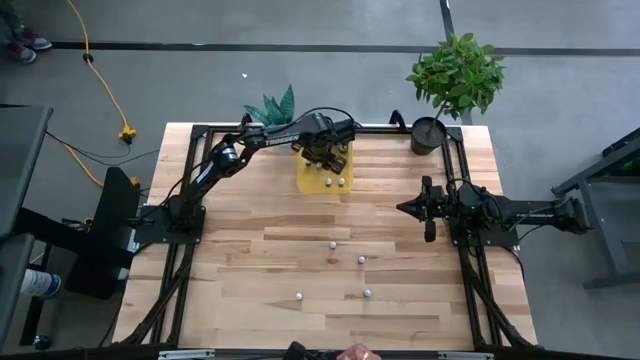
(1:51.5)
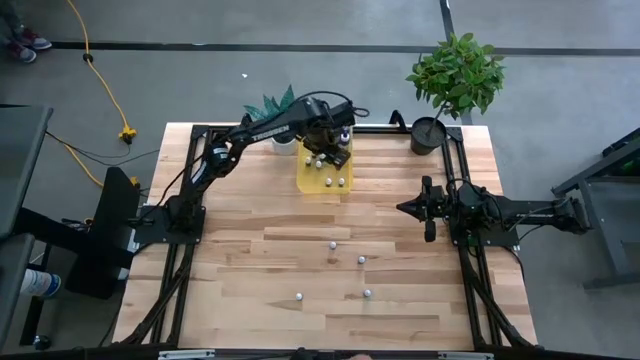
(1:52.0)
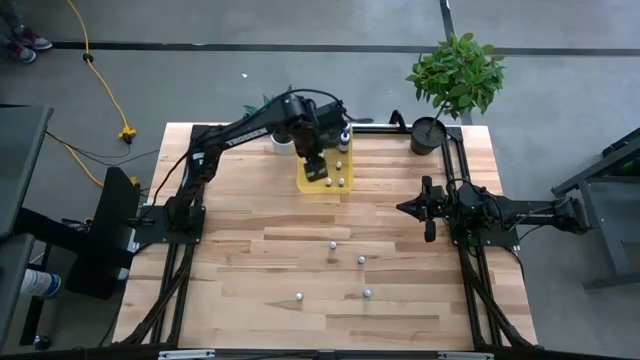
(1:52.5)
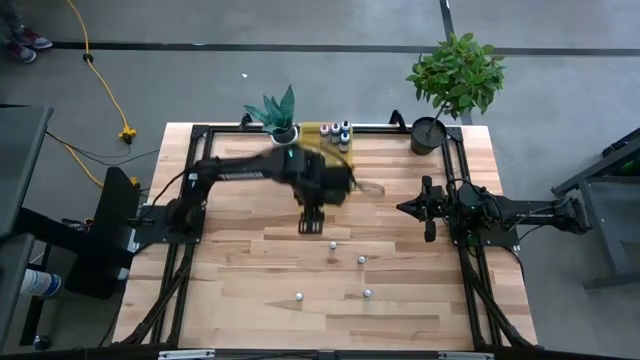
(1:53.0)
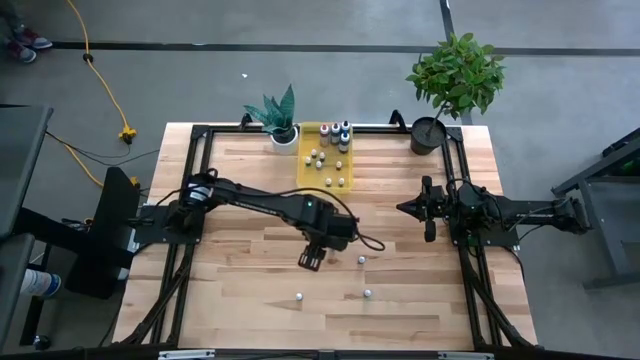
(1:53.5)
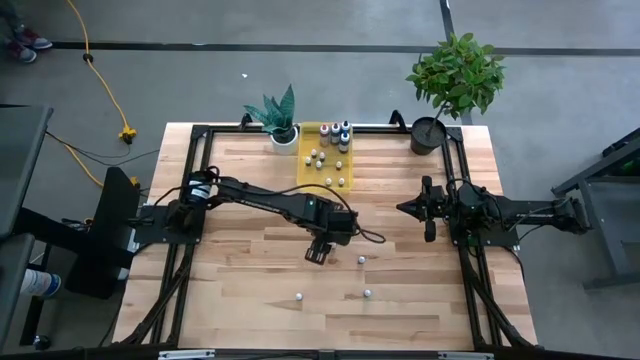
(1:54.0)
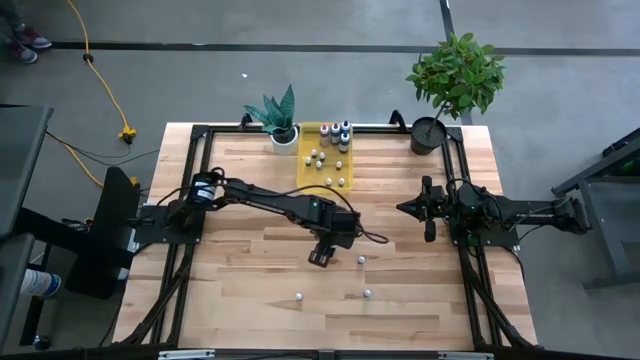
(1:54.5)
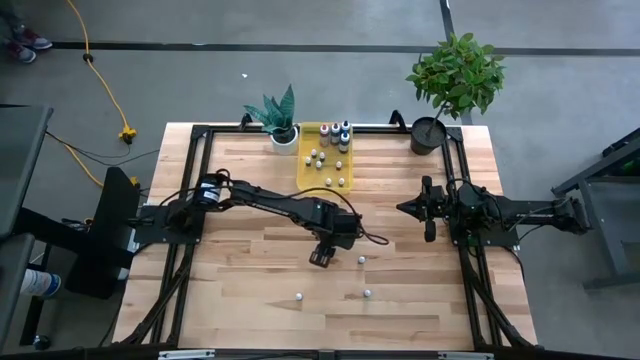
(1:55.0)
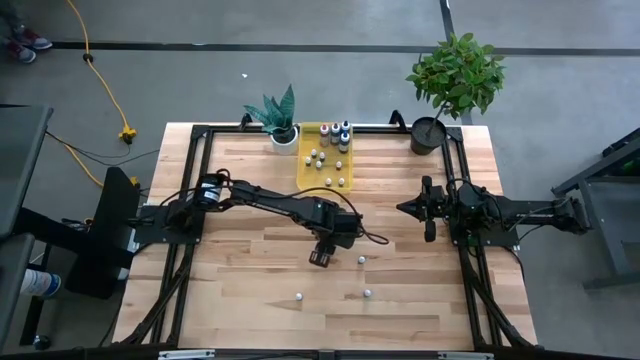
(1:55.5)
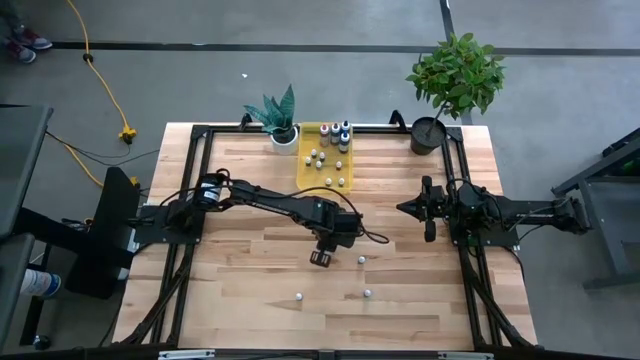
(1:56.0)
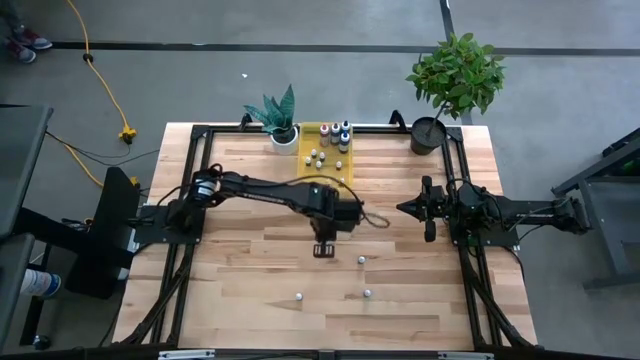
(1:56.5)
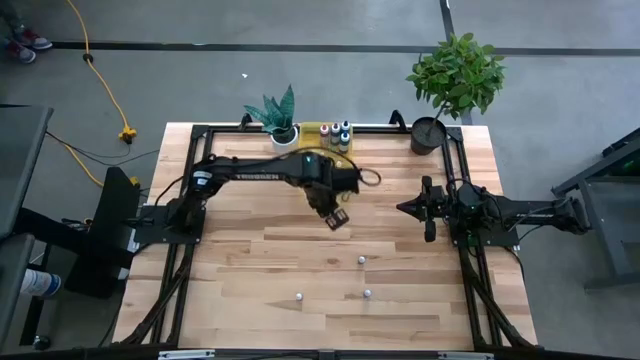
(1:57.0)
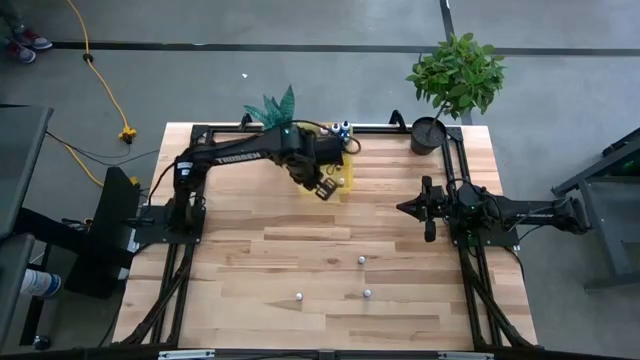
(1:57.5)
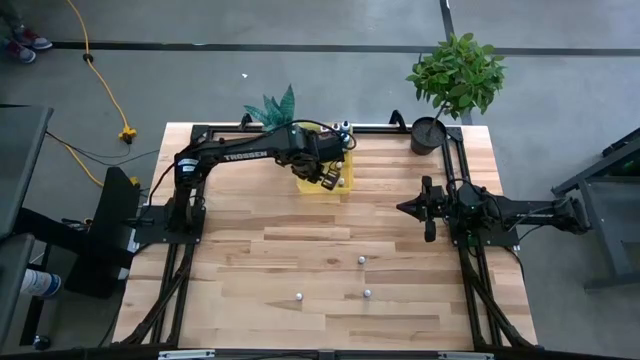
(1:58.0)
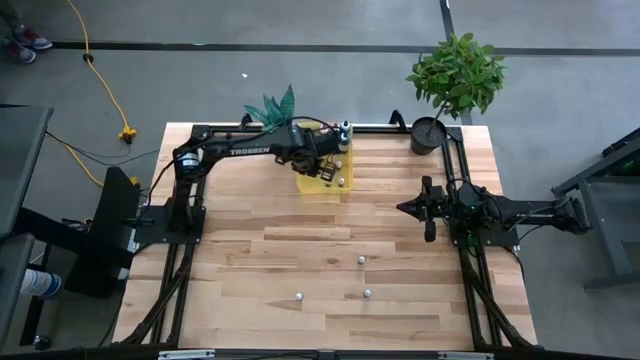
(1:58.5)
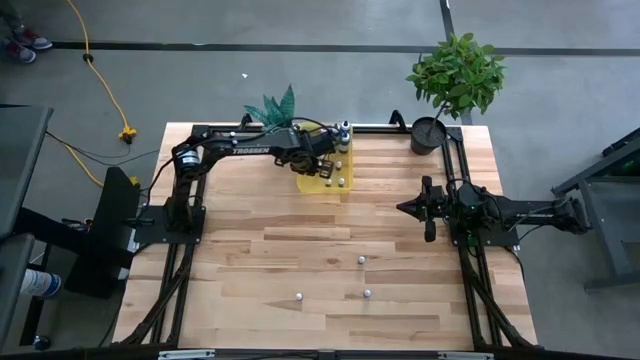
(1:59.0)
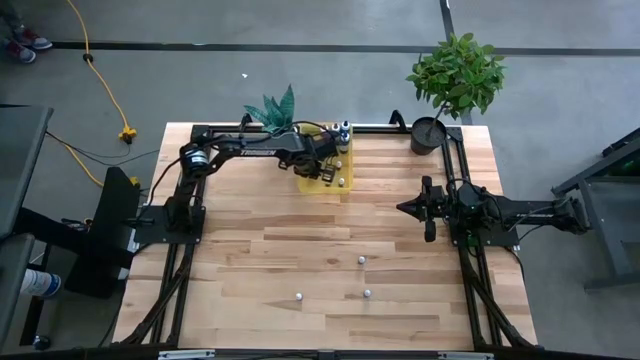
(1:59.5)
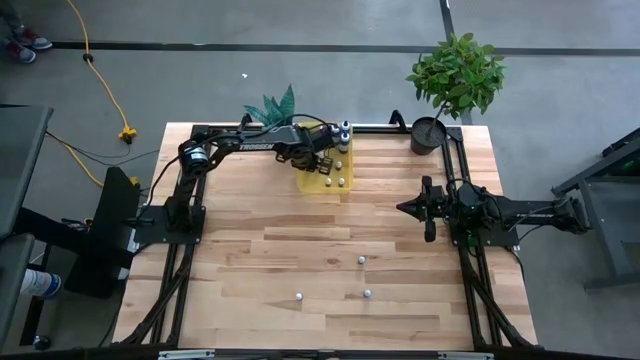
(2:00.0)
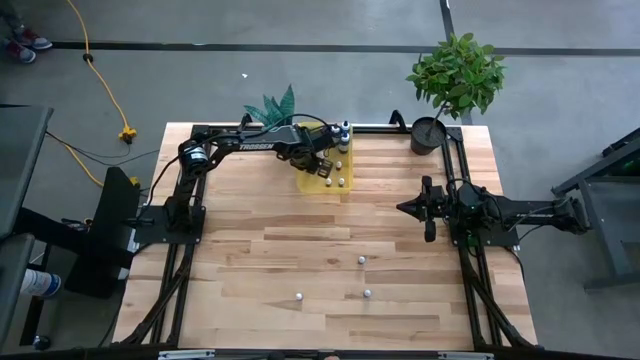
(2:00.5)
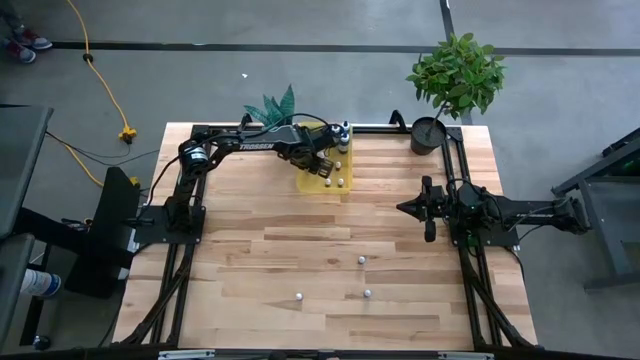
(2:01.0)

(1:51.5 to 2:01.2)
Task: Pick & Place food coloring
Put the small red food coloring bottle into the yellow bin

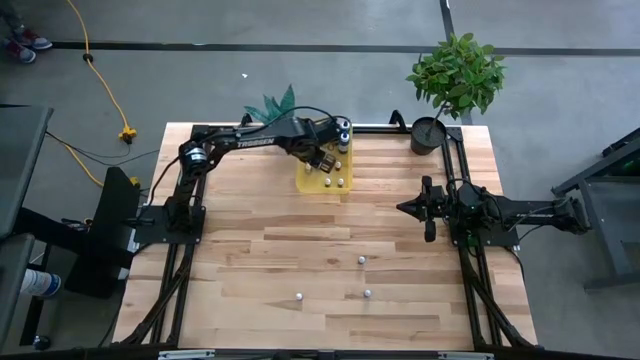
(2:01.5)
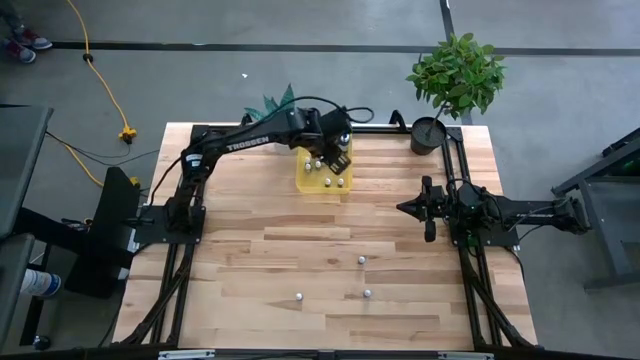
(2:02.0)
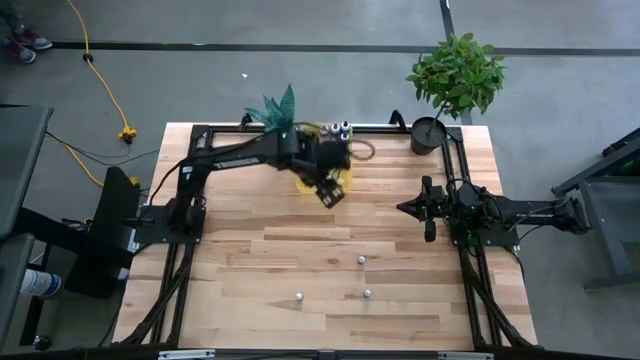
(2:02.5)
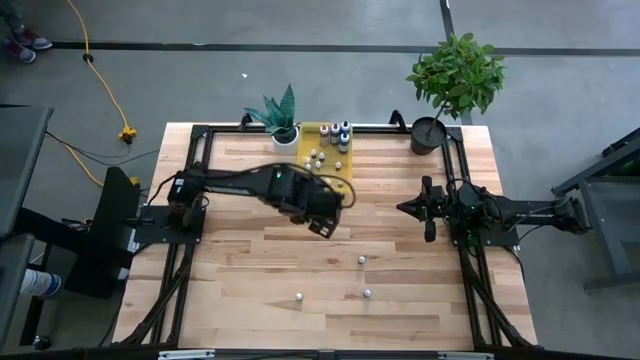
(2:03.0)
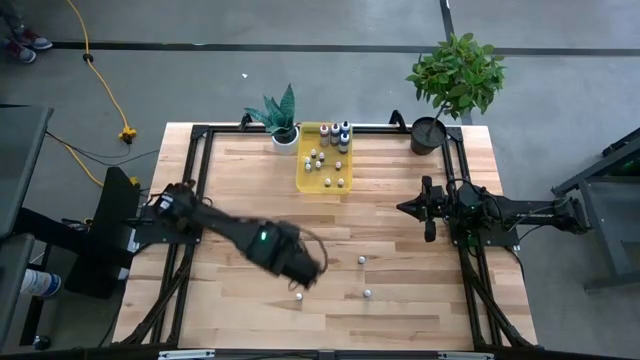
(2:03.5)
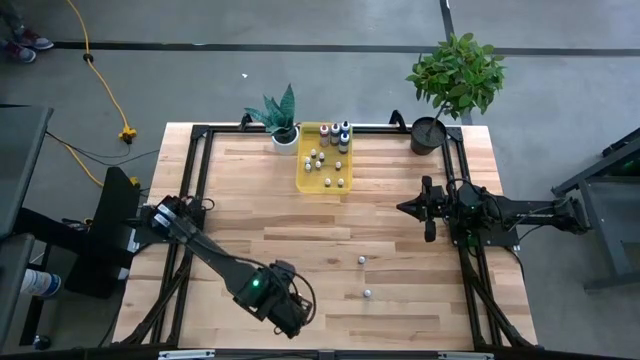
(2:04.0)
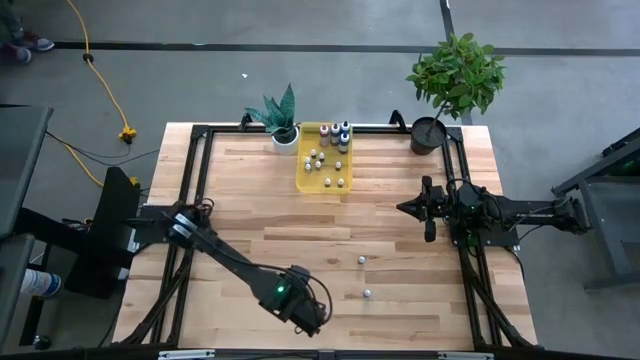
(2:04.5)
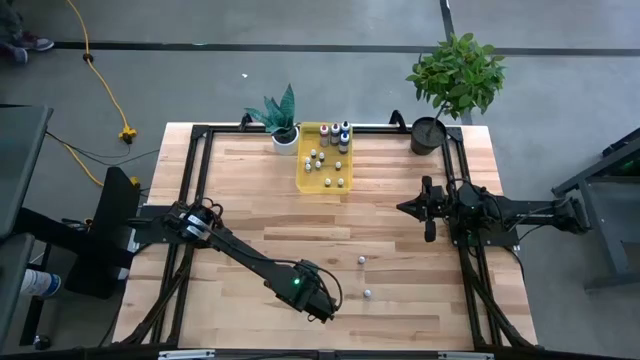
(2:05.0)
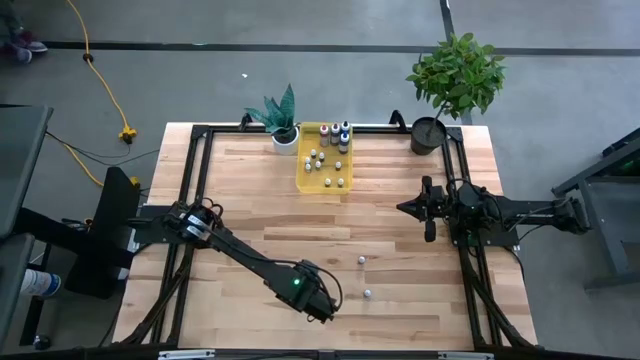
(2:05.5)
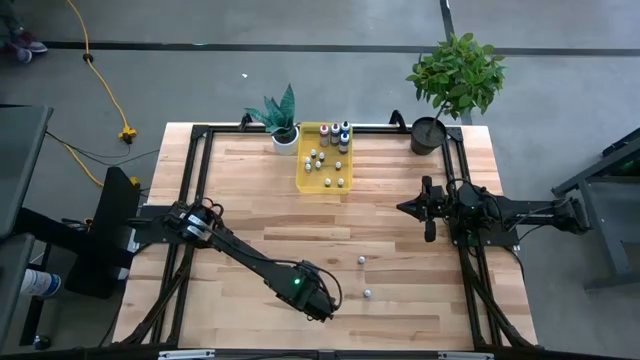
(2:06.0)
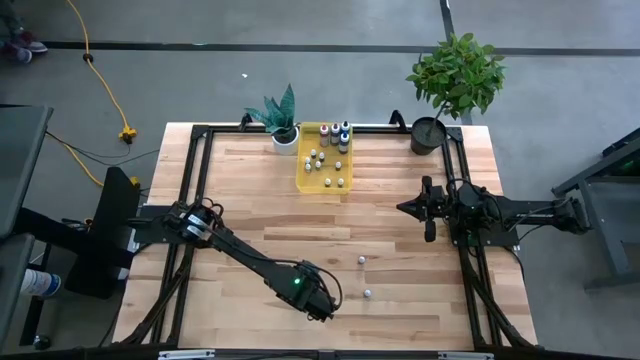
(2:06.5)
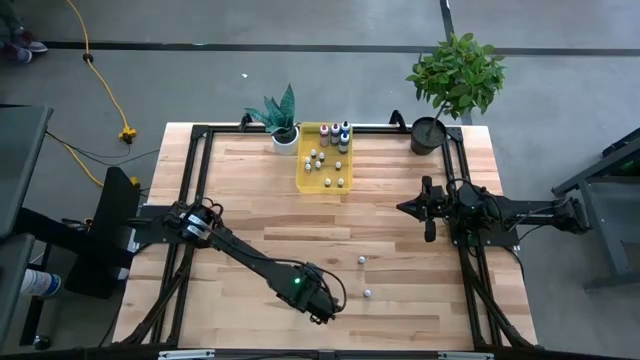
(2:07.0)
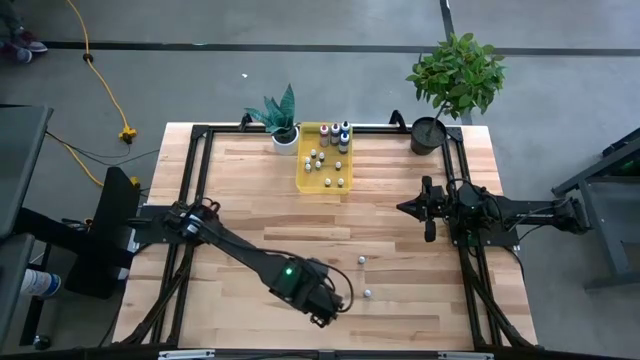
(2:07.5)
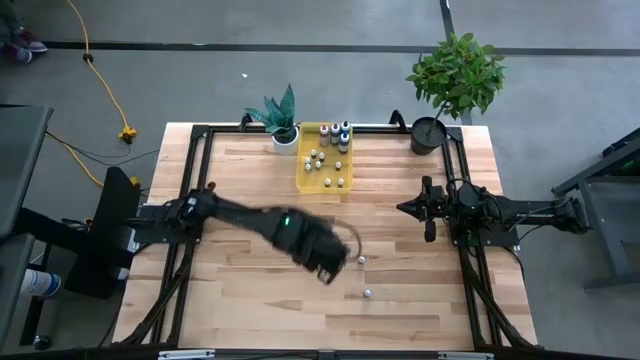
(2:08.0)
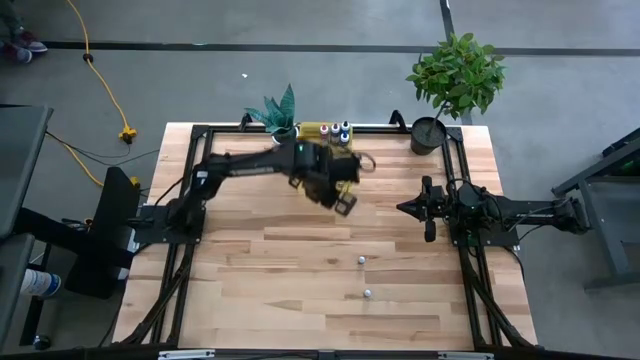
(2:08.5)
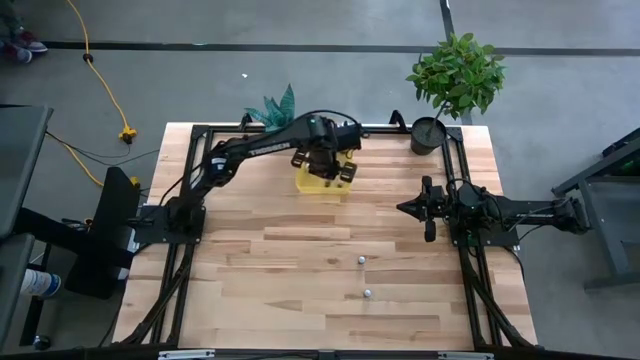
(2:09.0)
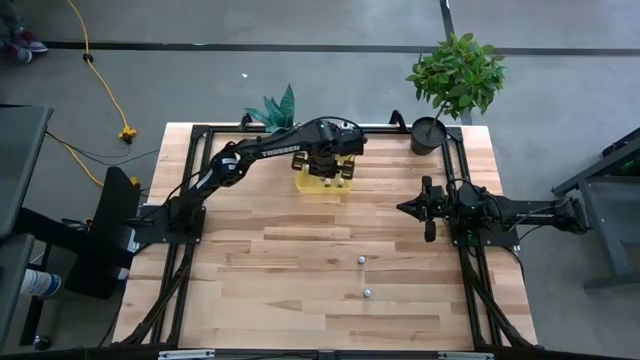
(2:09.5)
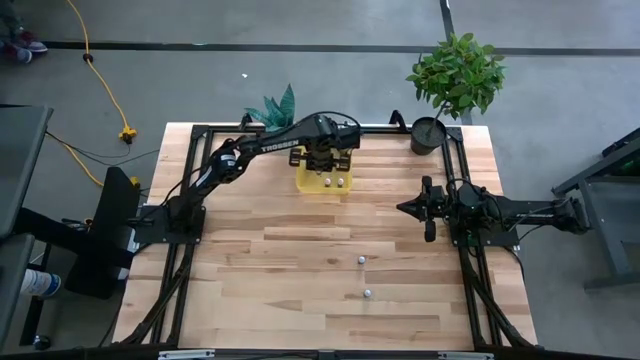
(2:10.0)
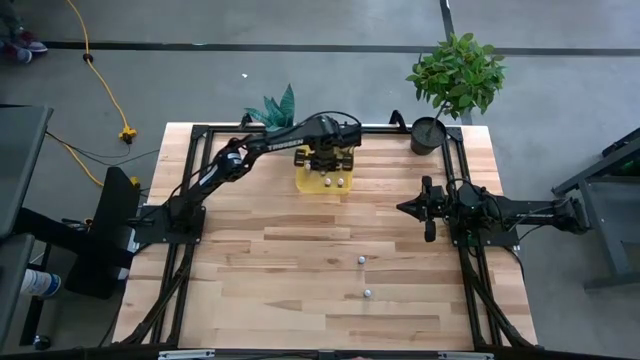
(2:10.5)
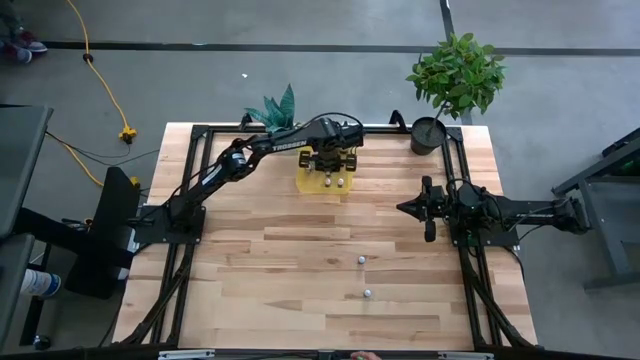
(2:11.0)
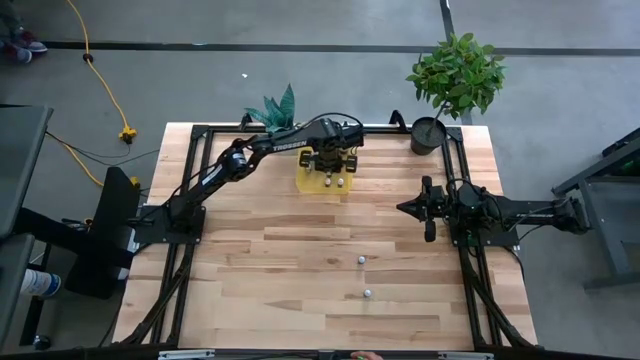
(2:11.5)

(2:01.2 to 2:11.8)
Put the small orange food coloring bottle into the yellow bin
